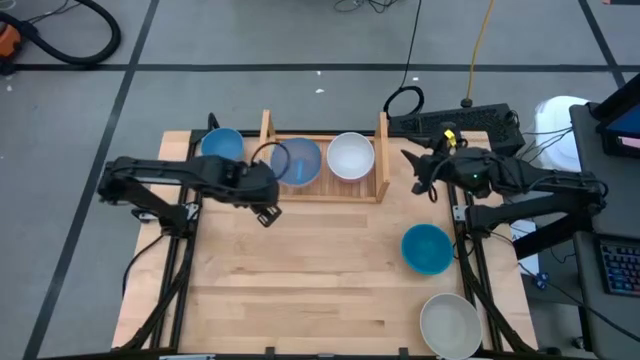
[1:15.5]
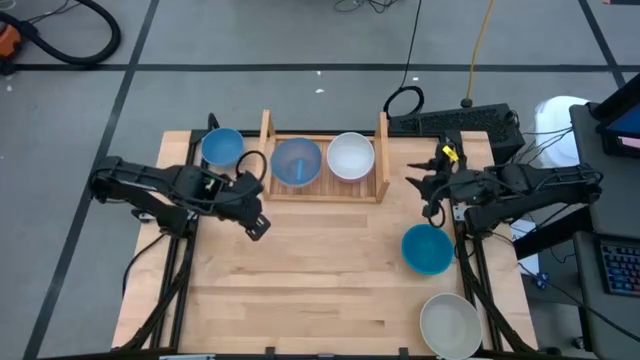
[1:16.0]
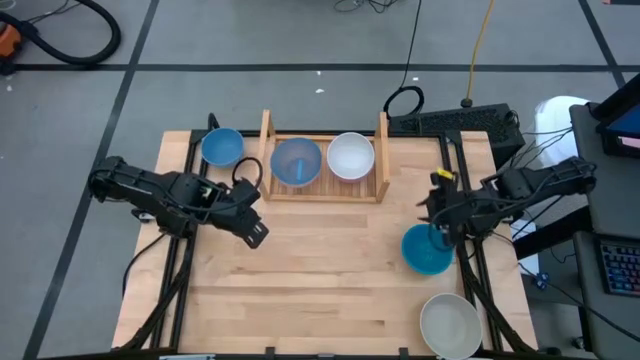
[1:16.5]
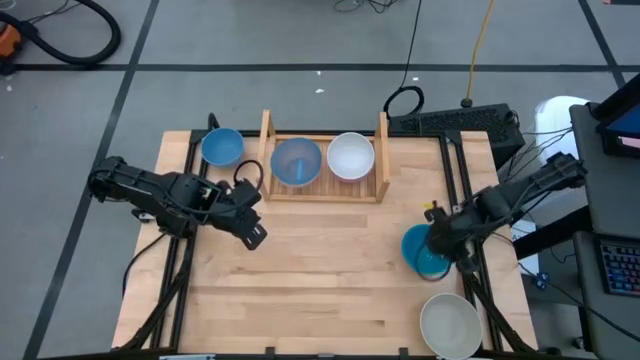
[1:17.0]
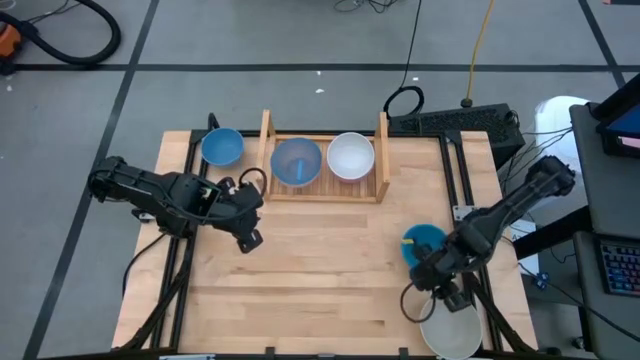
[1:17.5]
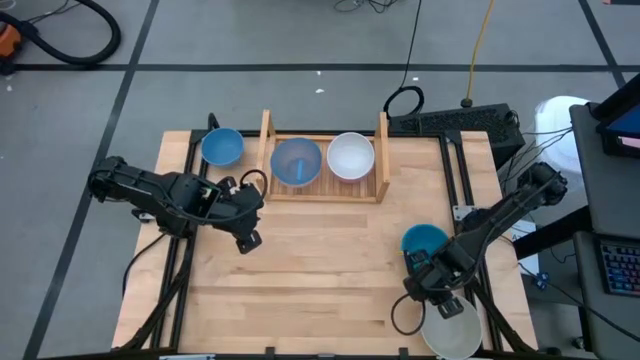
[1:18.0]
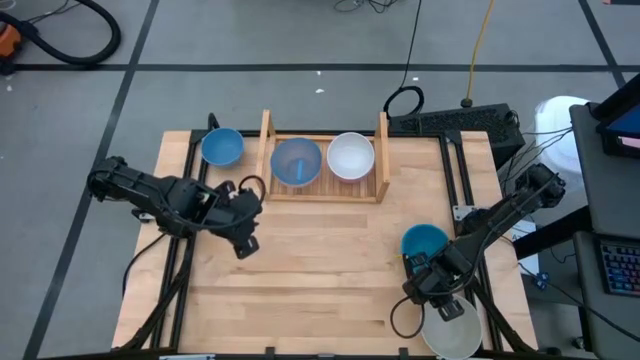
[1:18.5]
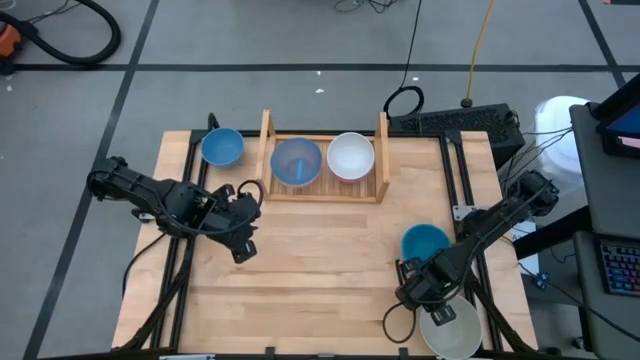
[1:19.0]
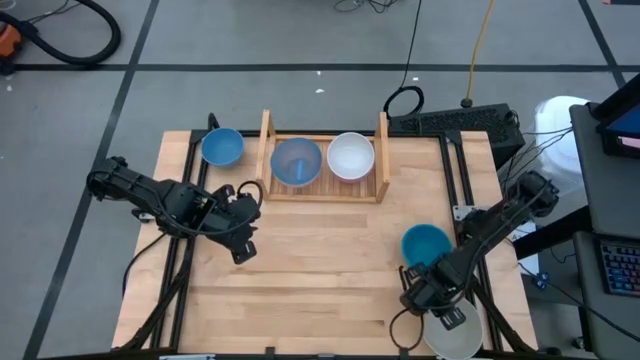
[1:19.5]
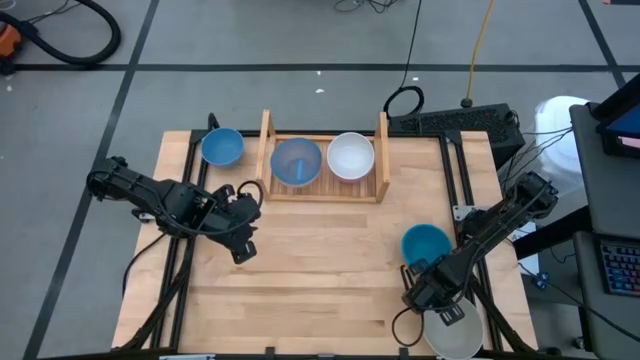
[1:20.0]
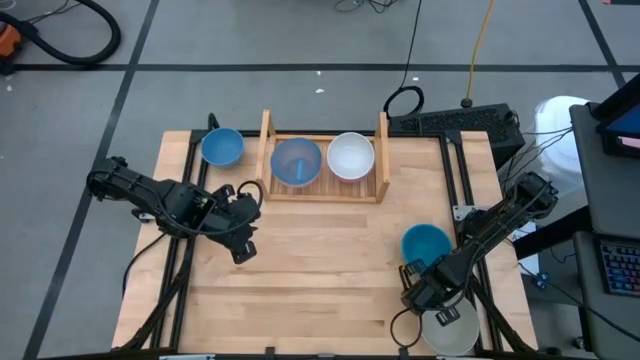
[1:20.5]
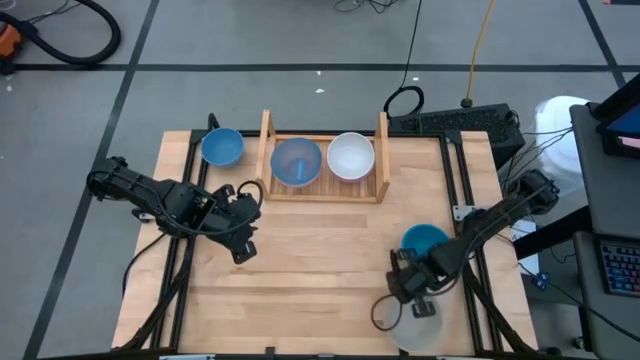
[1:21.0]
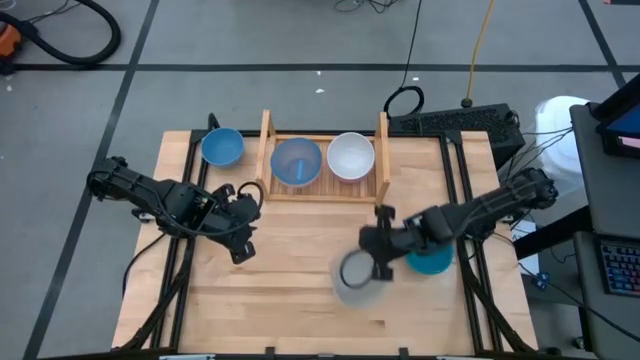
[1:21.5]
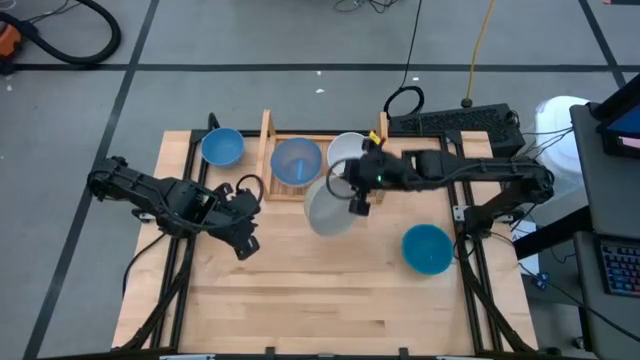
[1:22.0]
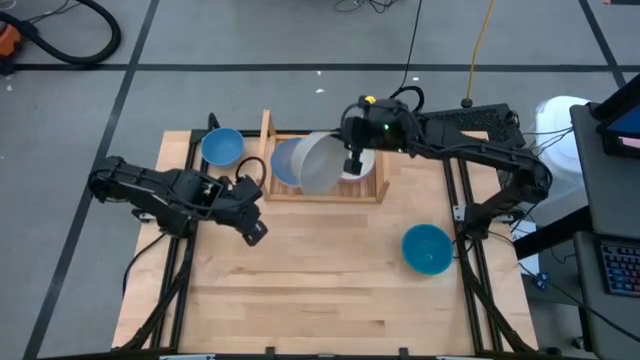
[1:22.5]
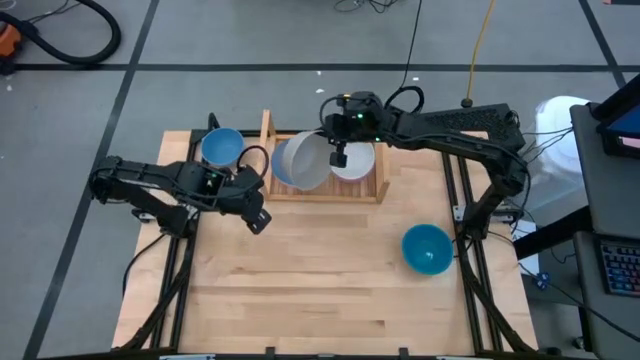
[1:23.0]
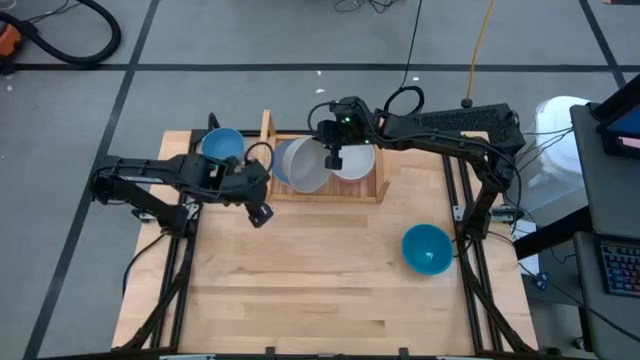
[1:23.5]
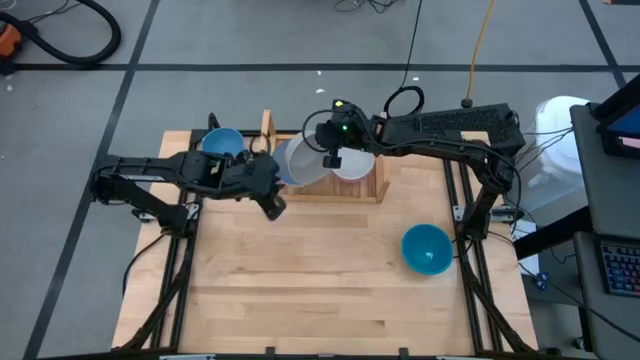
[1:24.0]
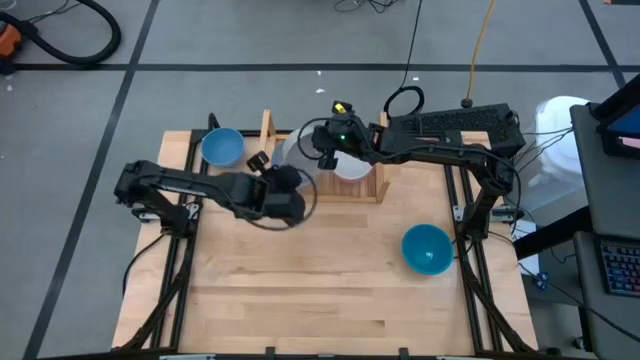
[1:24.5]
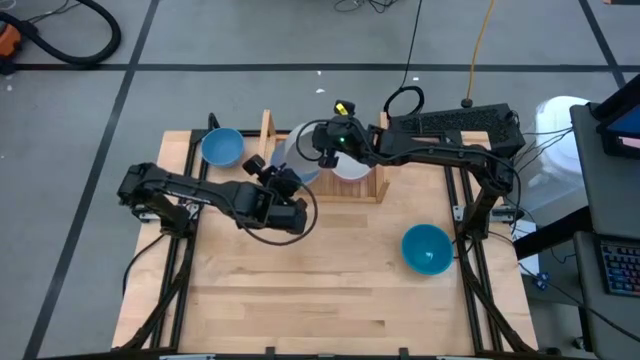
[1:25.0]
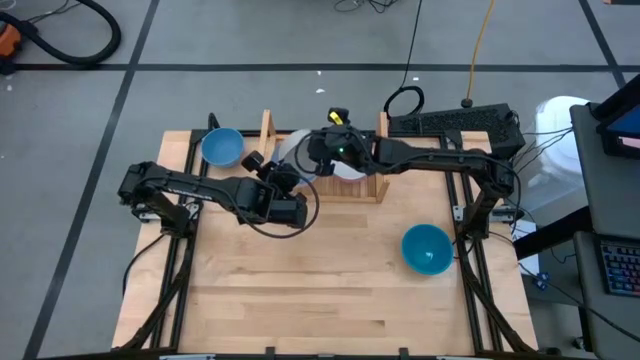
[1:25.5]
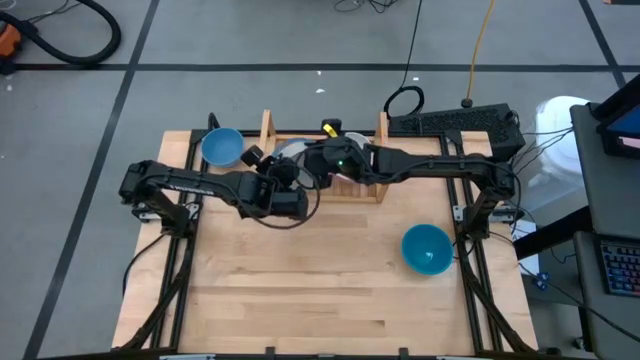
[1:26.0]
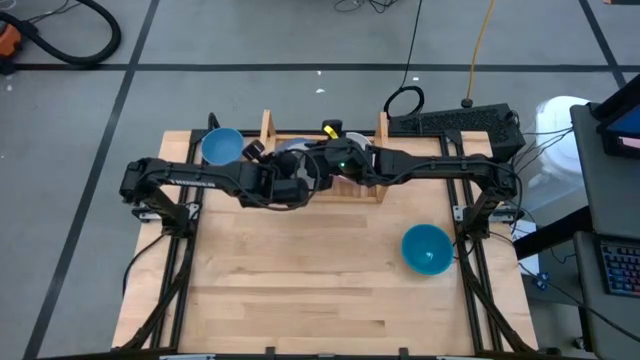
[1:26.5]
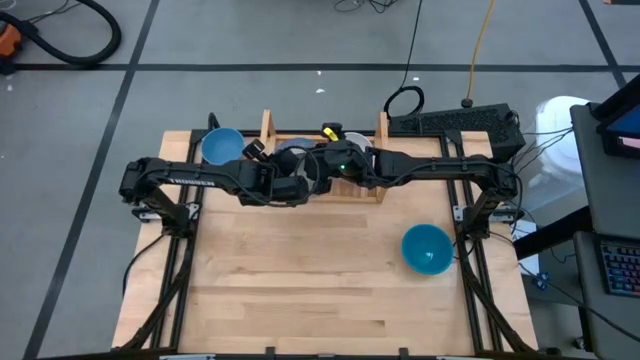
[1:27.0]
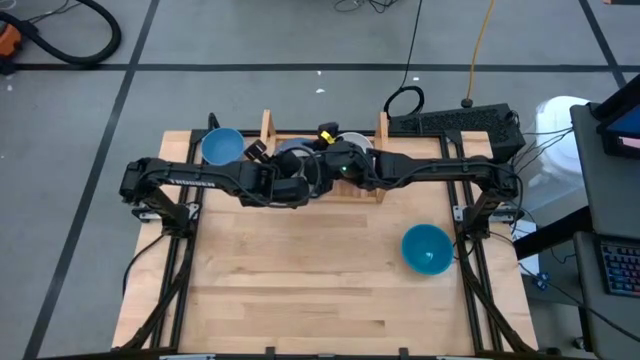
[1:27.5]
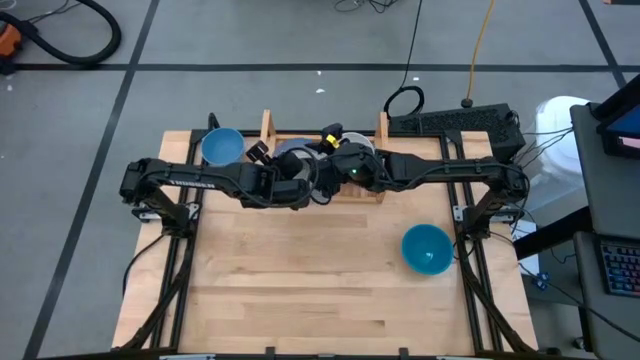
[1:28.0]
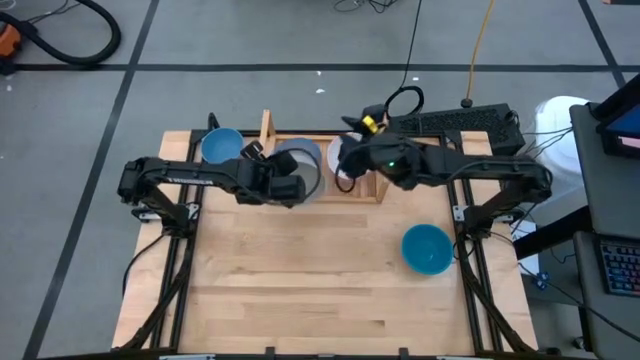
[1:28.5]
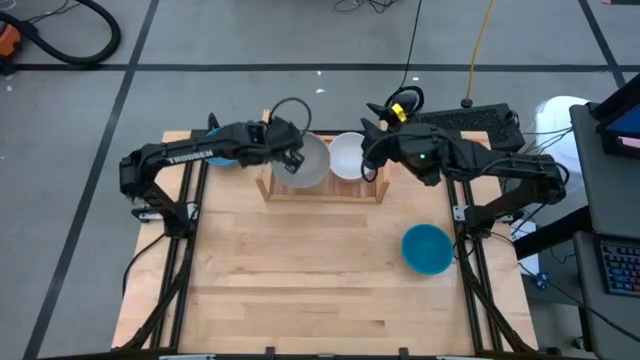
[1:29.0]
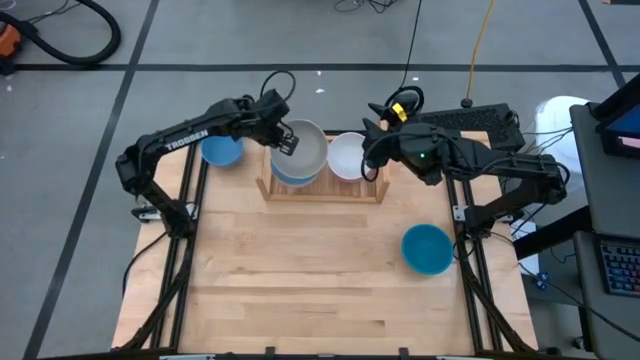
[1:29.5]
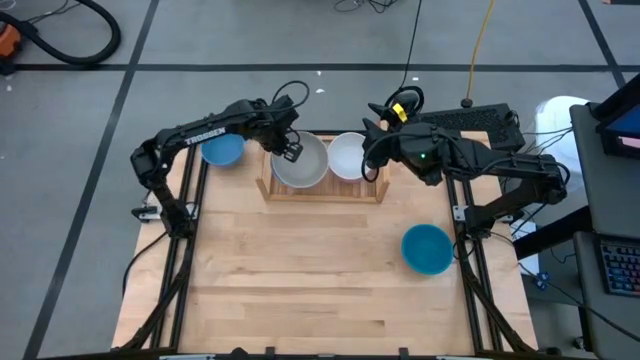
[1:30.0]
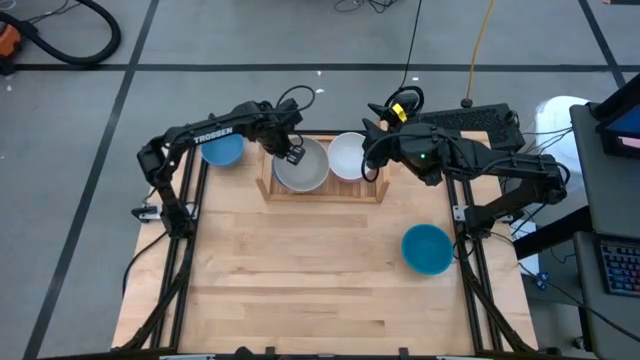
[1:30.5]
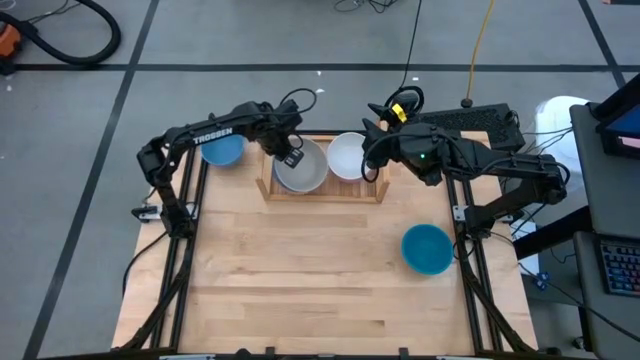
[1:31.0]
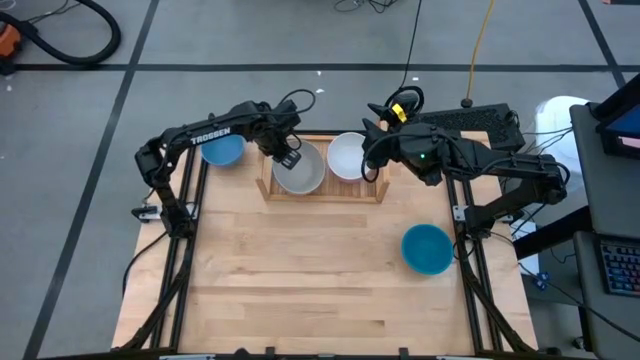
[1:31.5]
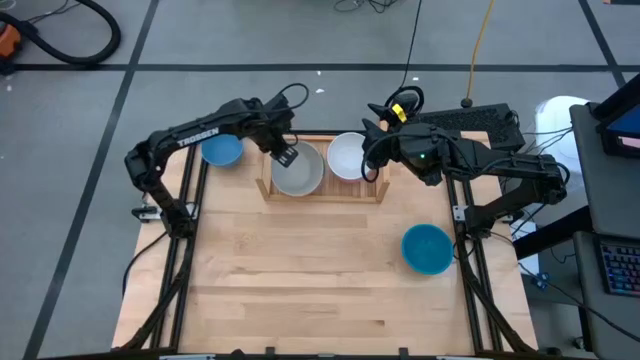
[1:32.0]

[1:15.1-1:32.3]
Task: Place and stack bowls onto a shelf
Stack the gray bowl on top of the blue bowl on the shelf

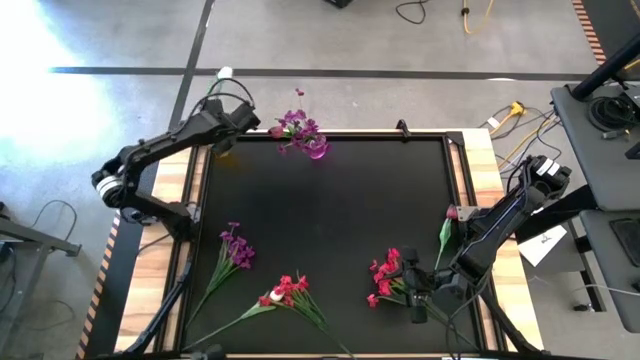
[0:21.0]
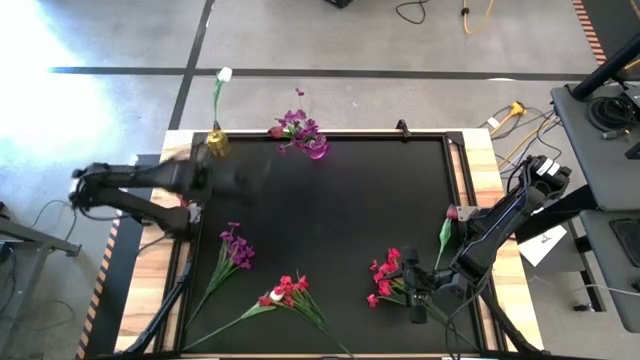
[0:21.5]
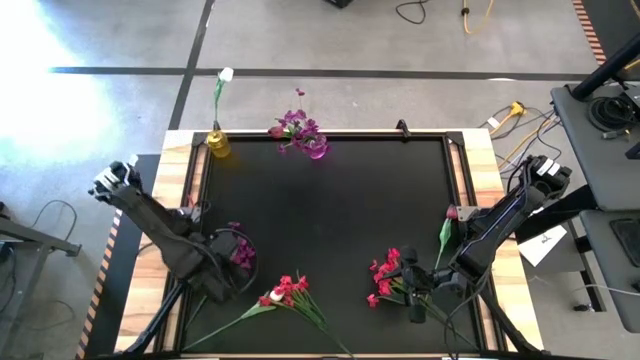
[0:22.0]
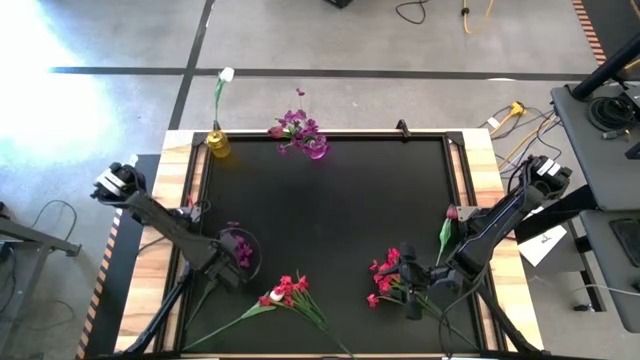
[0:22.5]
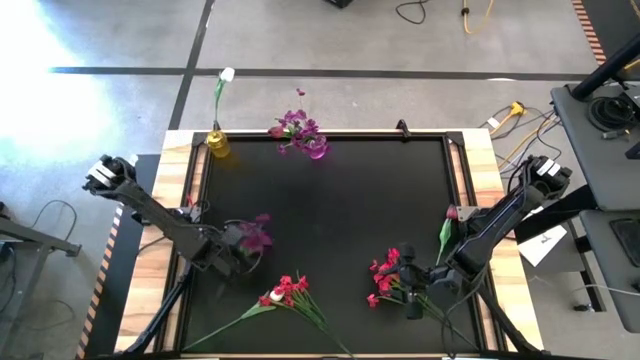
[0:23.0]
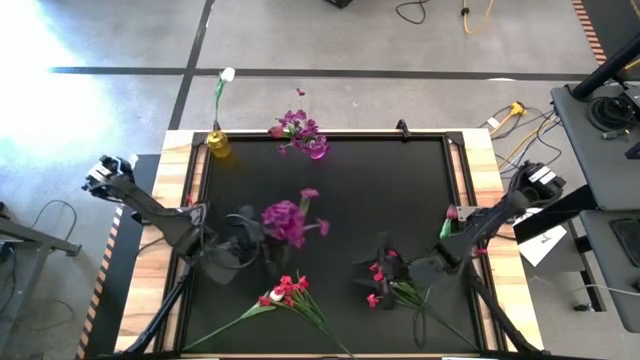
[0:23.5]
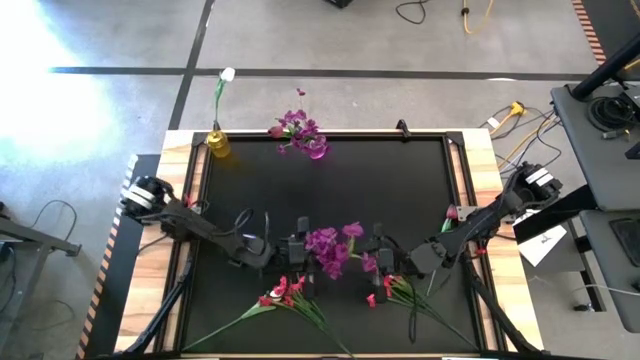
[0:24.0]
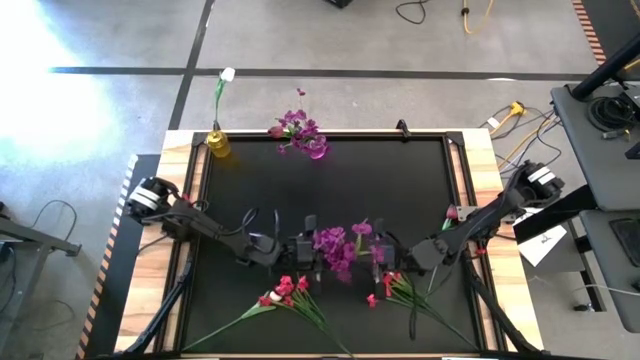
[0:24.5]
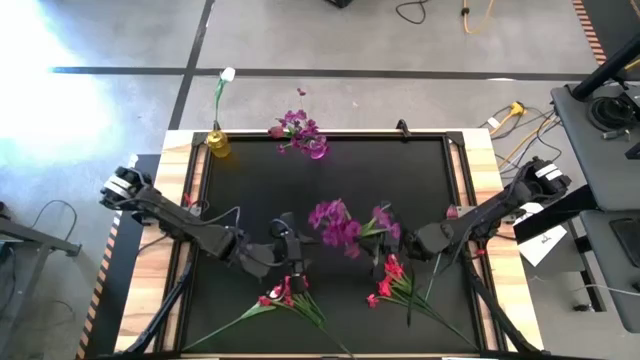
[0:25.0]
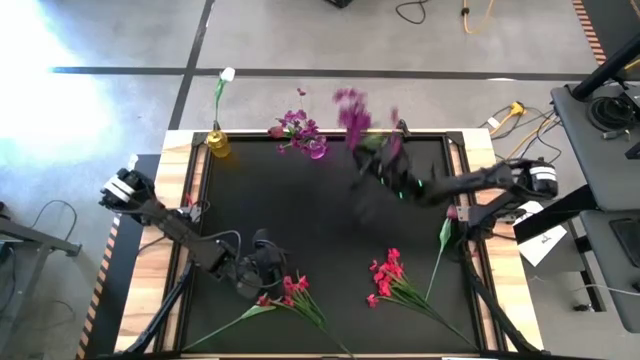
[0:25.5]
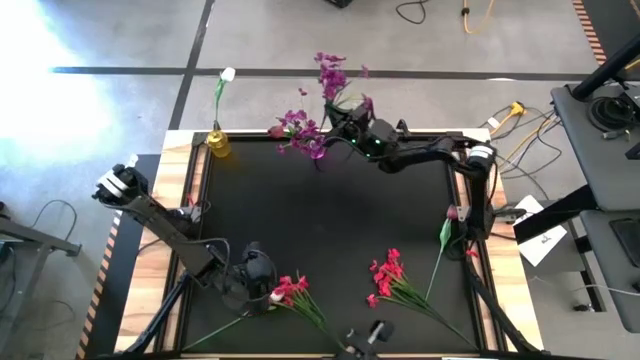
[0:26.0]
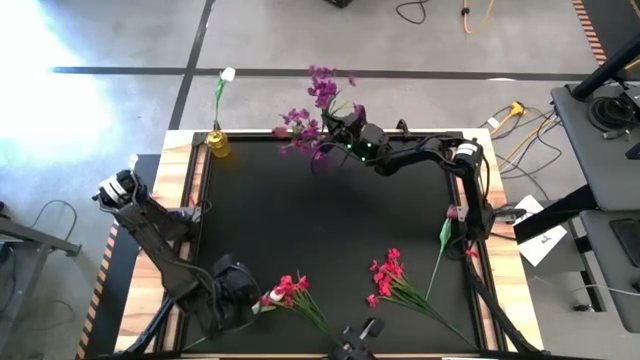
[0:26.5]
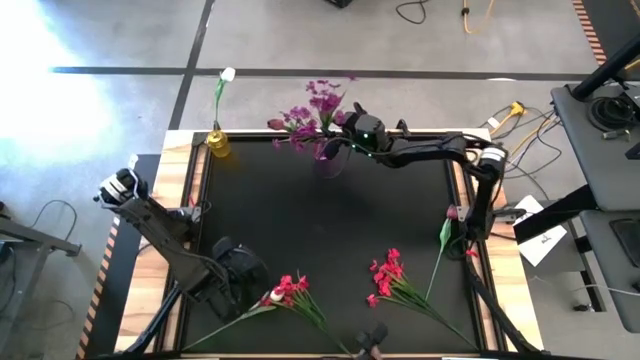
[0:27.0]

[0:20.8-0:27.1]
Task: Sort flowers into vase by color
Put the purple flowers into the purple vase
